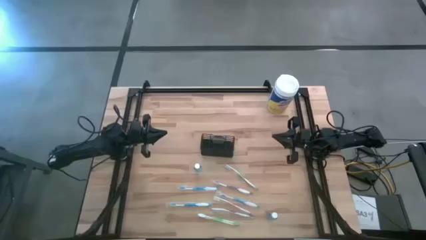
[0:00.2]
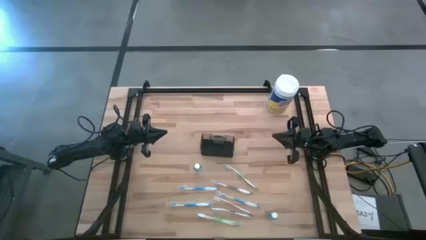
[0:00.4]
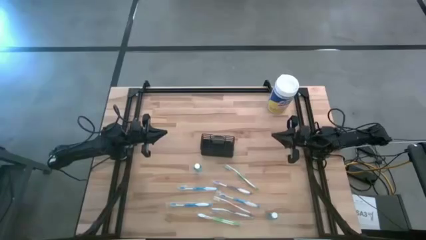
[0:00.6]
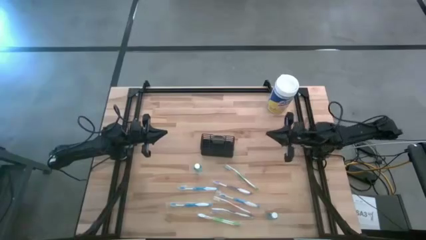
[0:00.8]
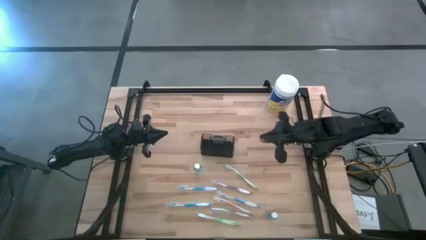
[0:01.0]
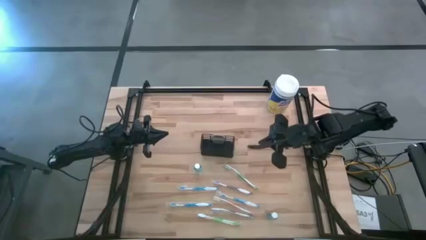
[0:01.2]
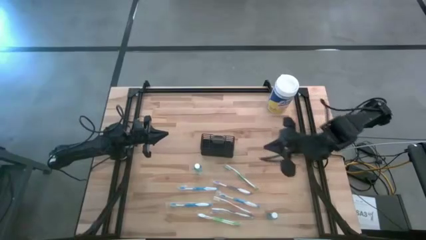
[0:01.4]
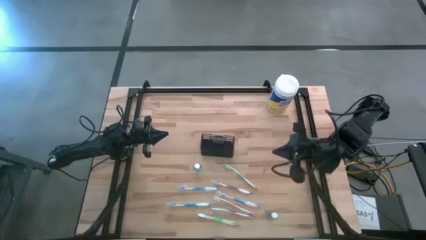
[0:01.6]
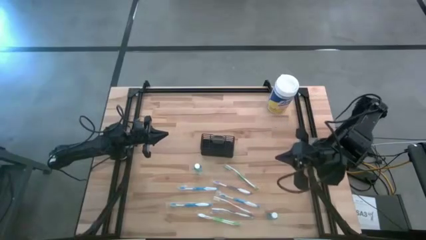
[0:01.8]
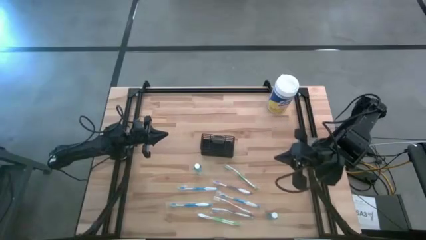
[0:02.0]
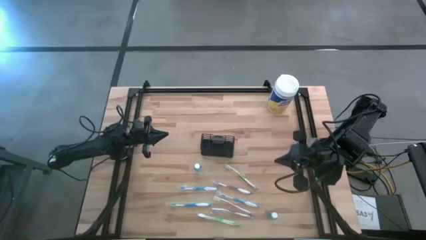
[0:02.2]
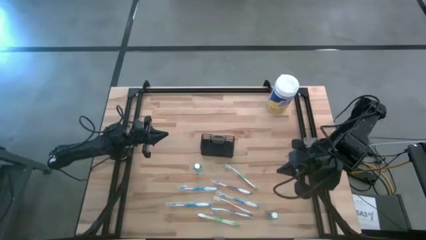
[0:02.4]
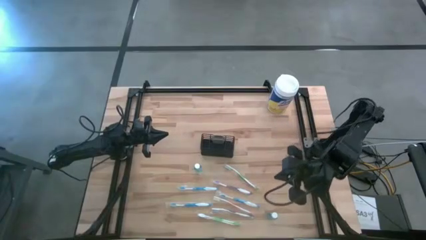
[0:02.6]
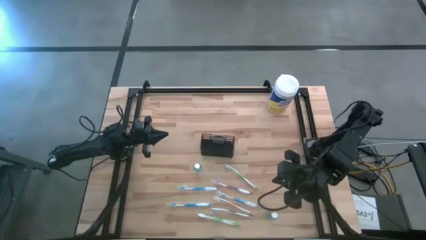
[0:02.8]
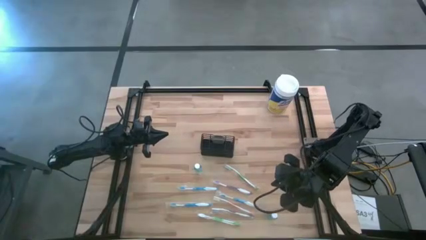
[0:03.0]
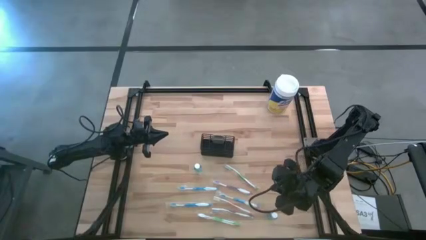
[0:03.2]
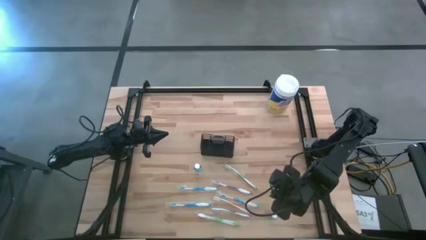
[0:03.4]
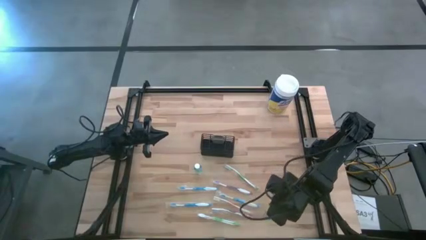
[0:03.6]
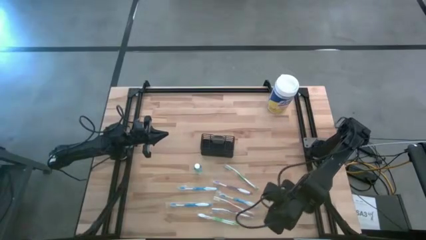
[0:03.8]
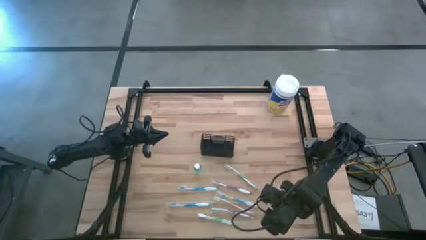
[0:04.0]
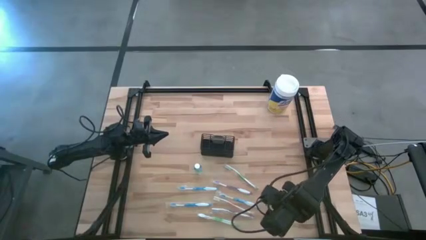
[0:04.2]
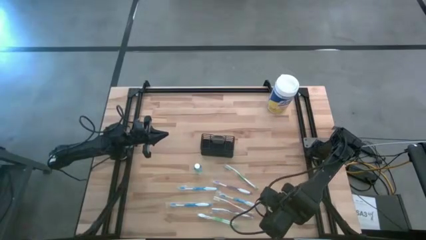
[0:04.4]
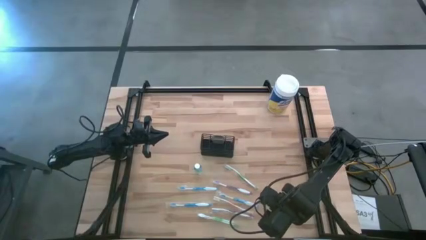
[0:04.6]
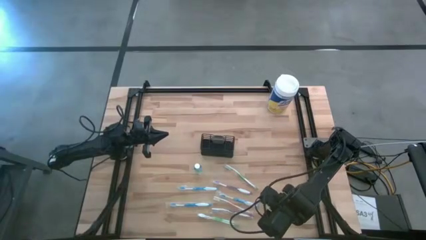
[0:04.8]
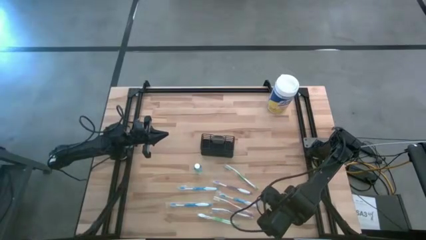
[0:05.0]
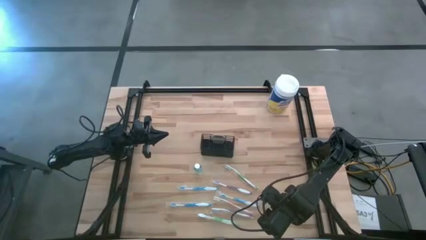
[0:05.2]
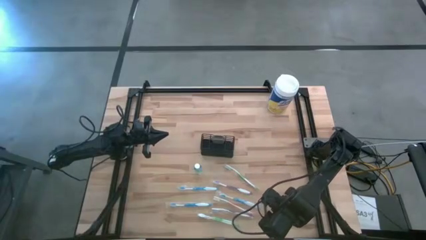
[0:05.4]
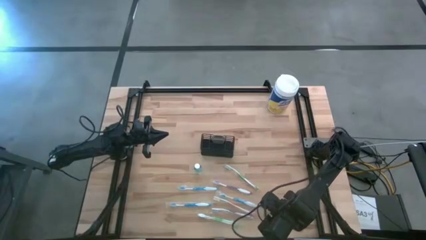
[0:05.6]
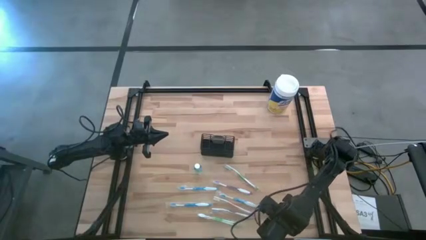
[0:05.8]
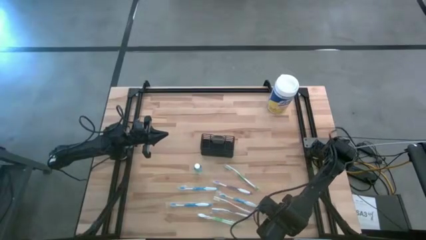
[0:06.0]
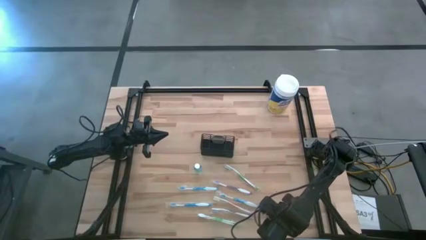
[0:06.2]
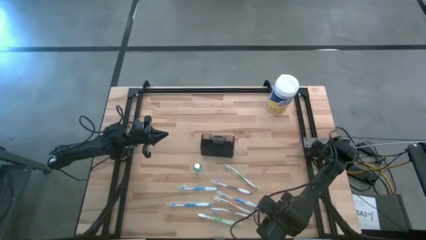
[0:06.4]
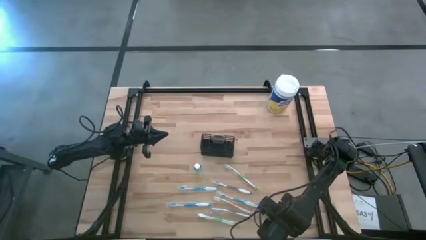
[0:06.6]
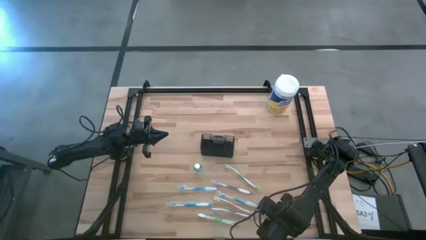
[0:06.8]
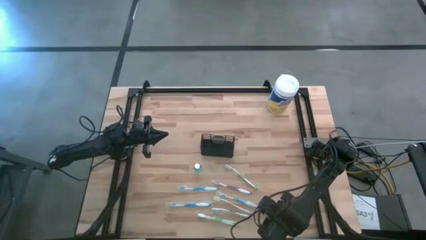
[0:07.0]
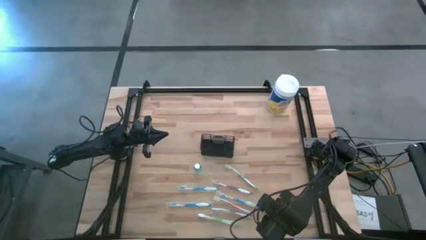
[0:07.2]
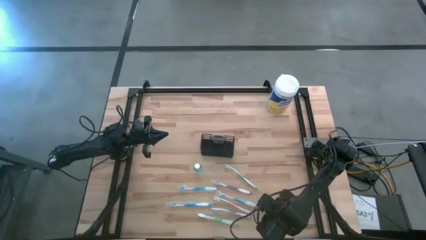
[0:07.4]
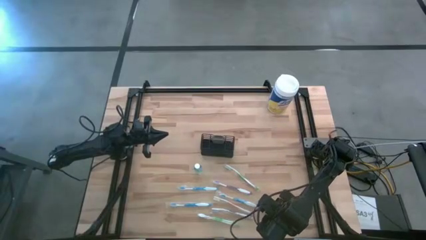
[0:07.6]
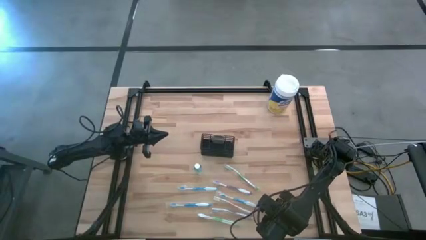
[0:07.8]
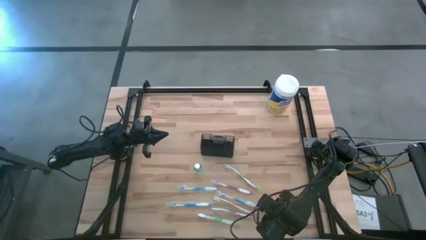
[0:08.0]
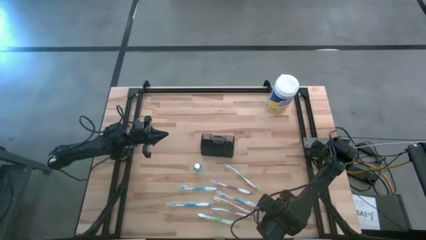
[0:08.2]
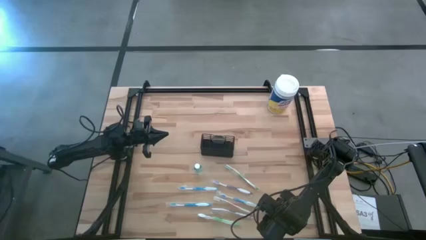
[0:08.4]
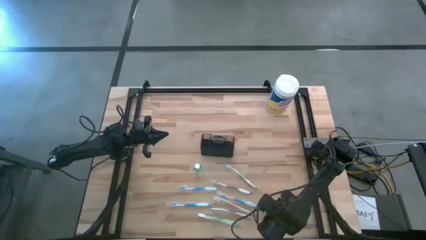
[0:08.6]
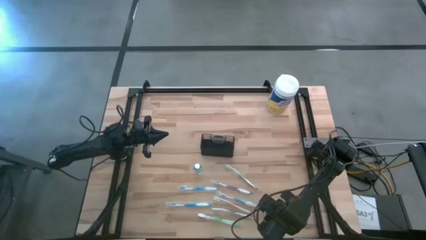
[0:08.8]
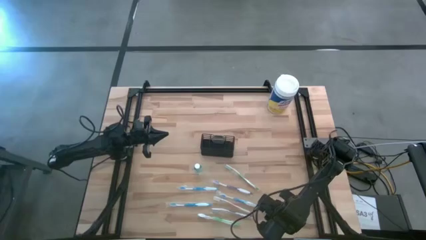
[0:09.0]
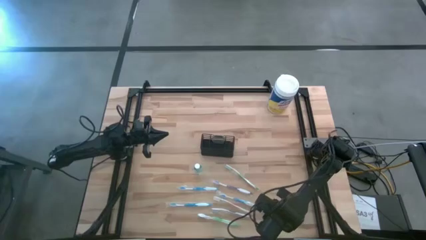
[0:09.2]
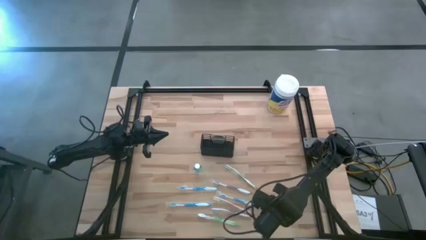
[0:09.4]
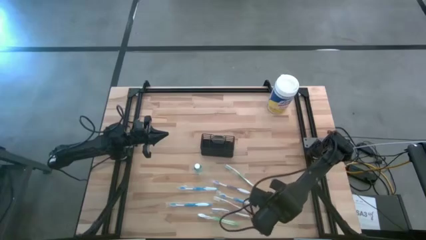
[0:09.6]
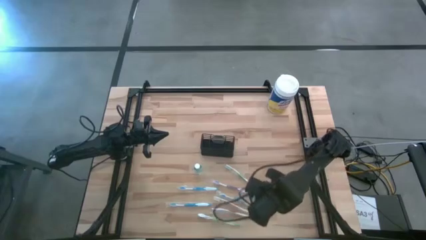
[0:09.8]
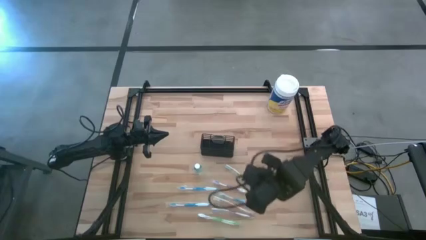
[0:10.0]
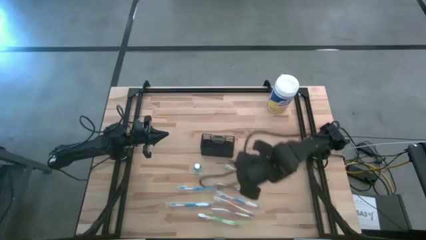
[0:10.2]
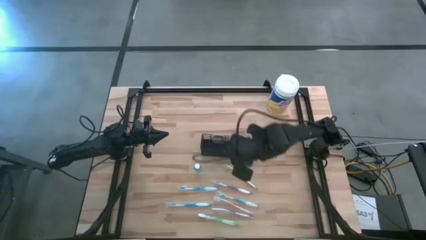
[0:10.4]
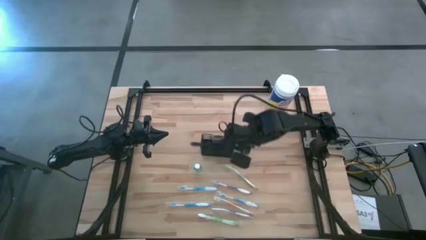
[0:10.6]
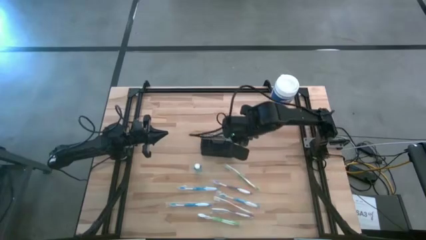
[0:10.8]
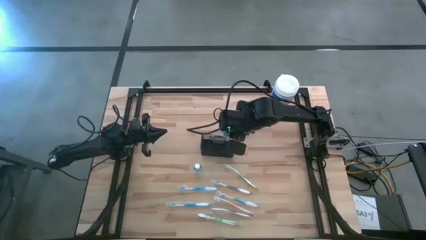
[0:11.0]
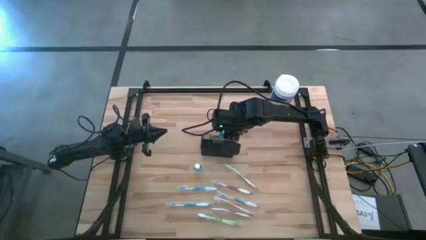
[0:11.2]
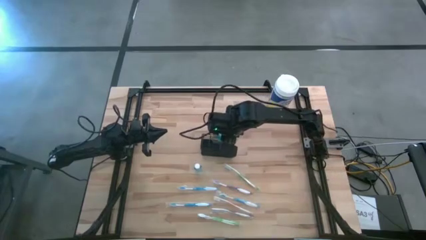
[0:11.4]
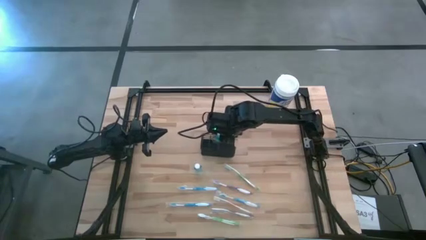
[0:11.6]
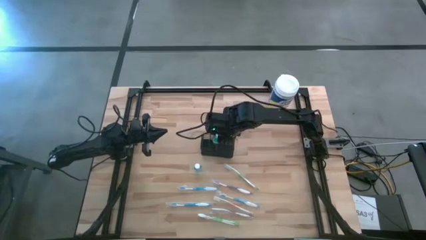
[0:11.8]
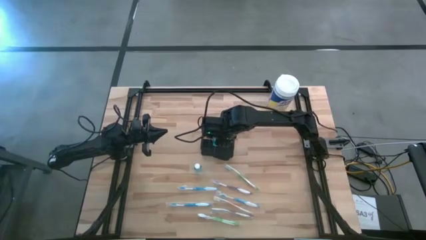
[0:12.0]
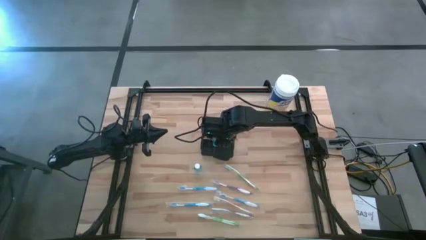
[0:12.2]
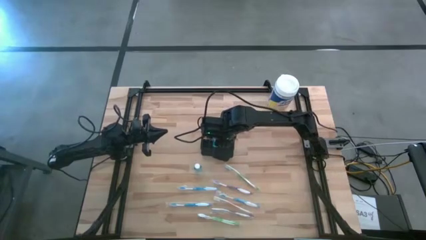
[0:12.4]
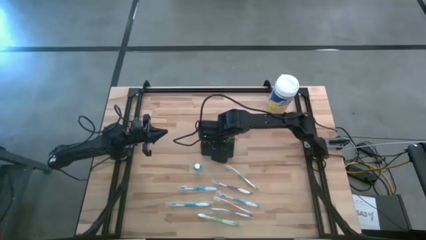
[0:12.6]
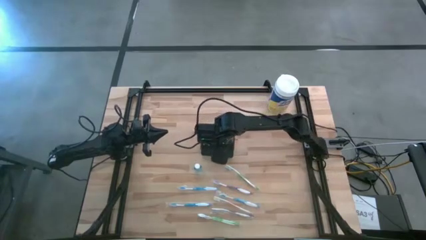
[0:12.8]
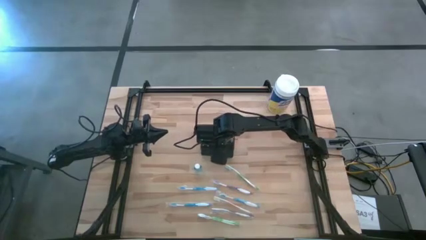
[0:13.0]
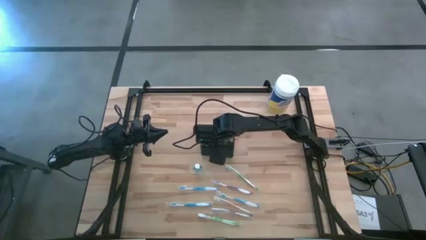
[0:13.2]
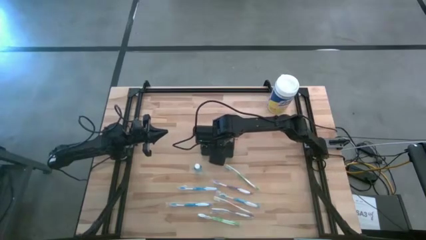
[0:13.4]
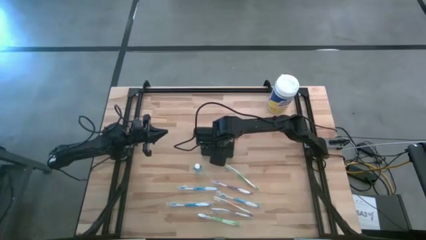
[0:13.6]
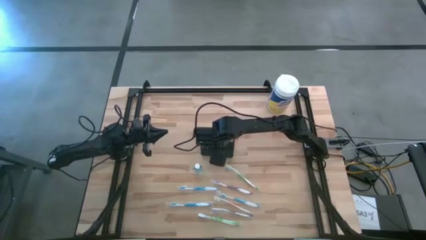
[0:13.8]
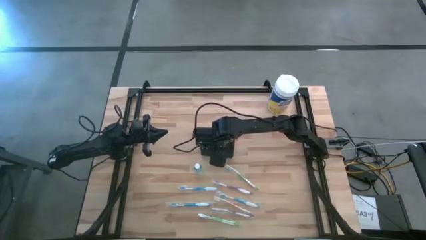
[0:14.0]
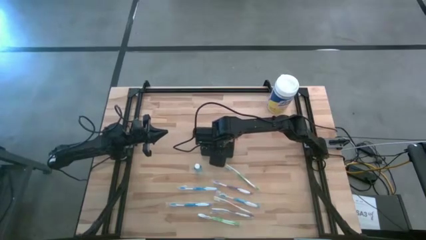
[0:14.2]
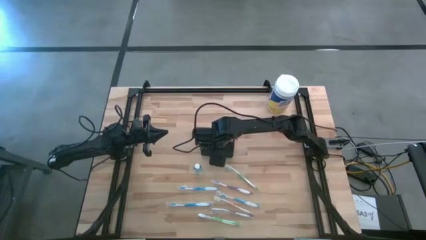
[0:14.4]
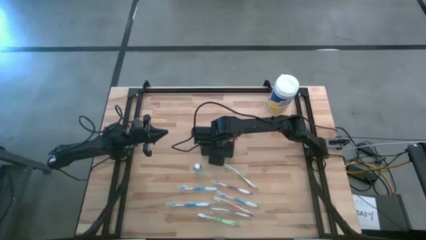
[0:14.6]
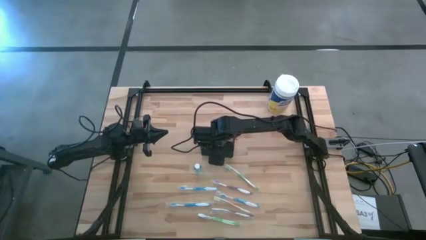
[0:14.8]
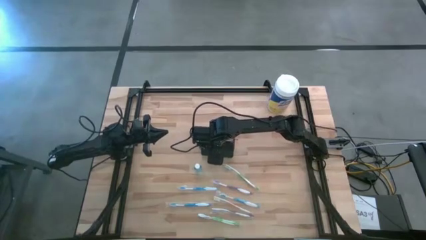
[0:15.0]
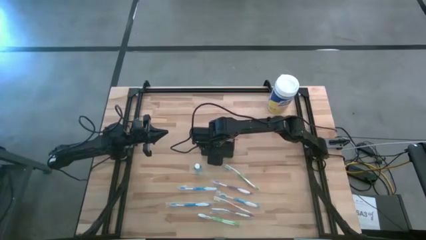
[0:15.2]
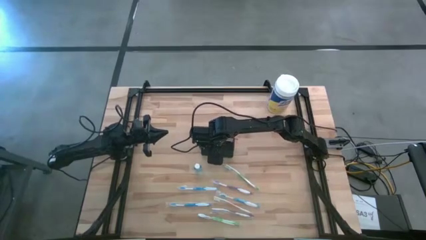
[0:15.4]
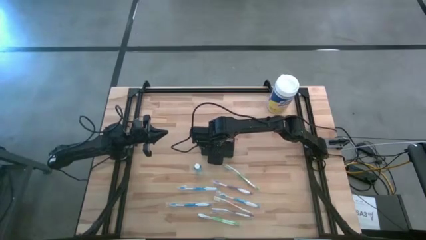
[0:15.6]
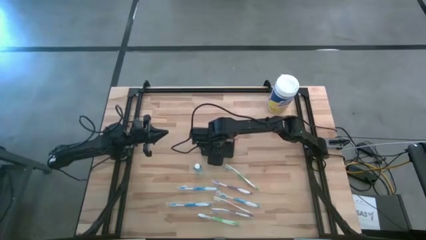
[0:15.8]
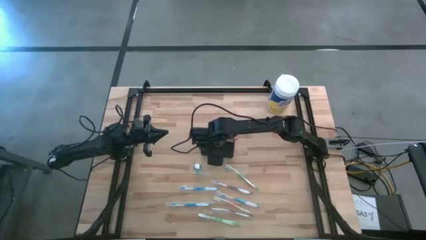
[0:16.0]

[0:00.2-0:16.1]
Task: Pick & Place toothbrushing station
Put the bottom mouthwash into the wire organizer
